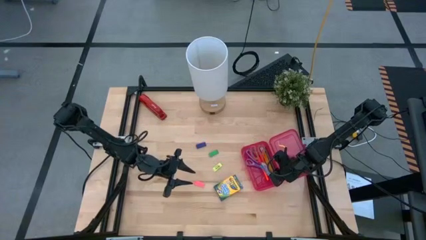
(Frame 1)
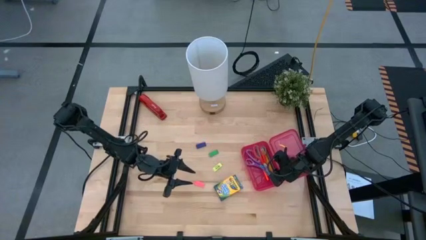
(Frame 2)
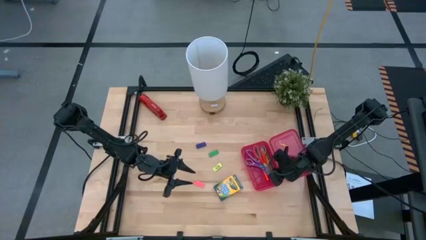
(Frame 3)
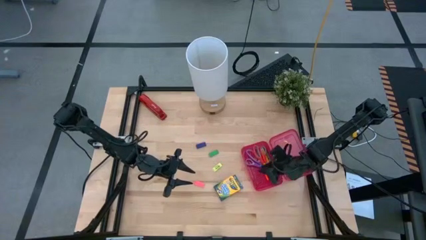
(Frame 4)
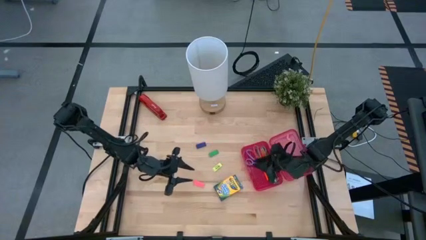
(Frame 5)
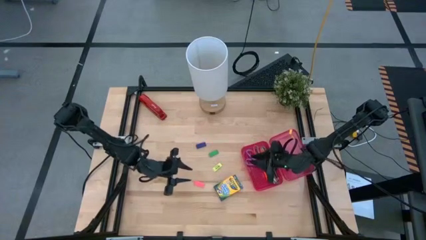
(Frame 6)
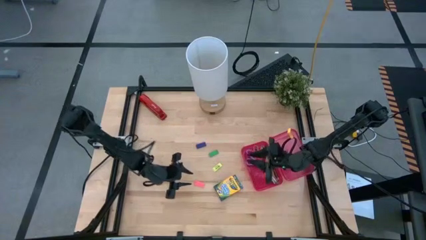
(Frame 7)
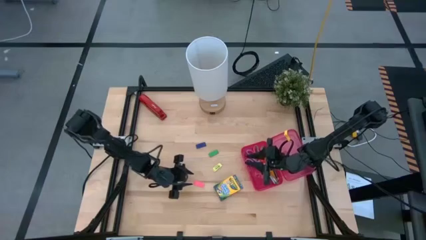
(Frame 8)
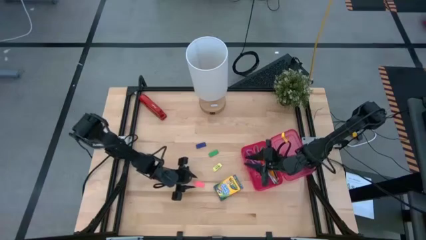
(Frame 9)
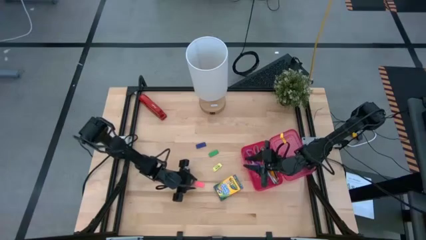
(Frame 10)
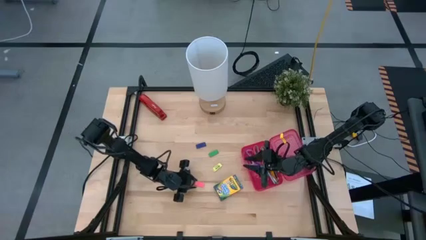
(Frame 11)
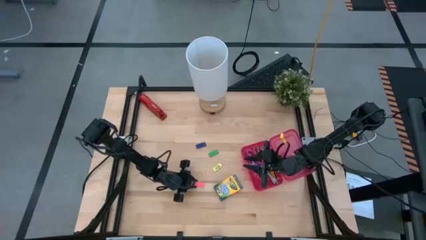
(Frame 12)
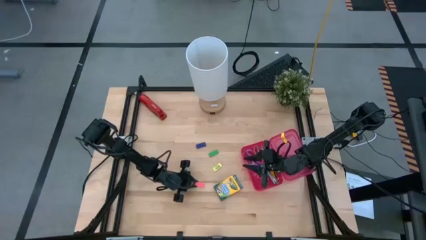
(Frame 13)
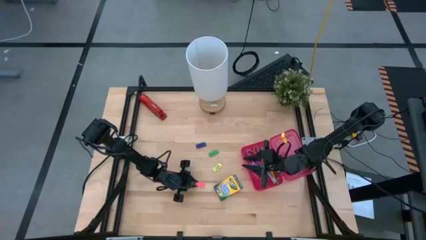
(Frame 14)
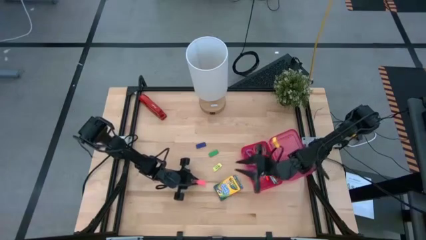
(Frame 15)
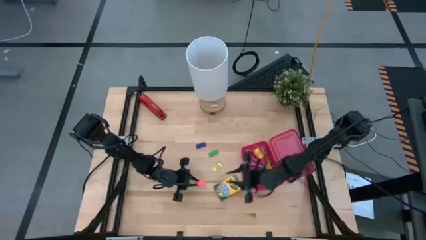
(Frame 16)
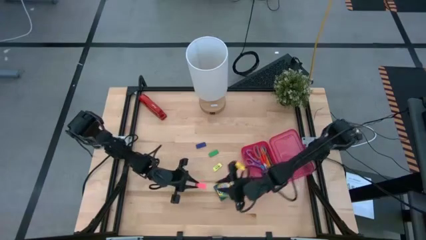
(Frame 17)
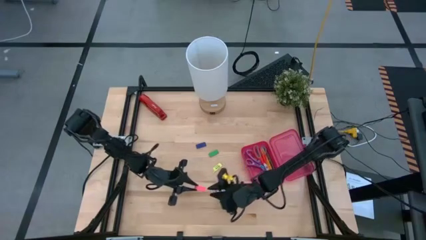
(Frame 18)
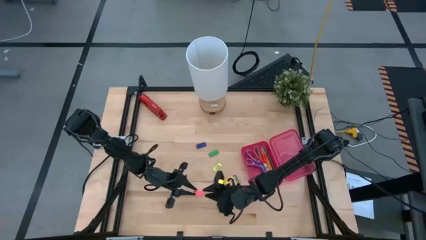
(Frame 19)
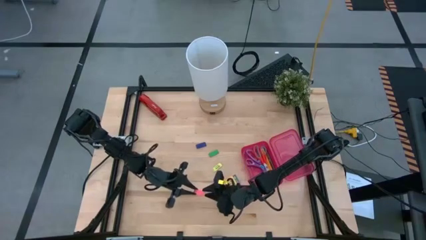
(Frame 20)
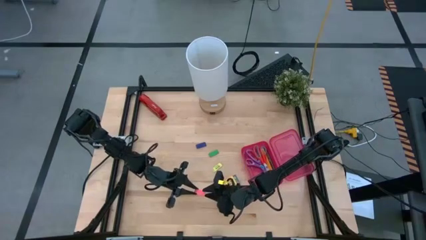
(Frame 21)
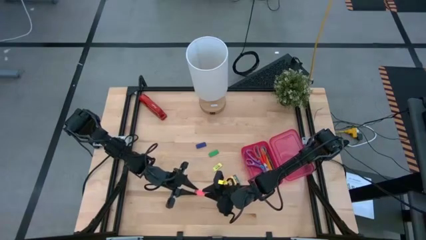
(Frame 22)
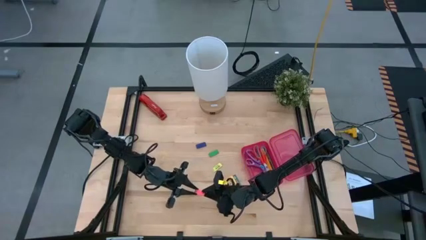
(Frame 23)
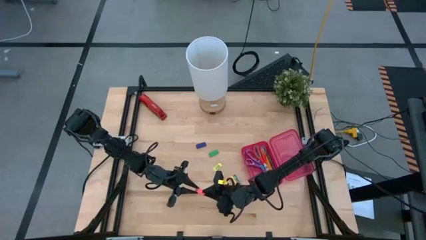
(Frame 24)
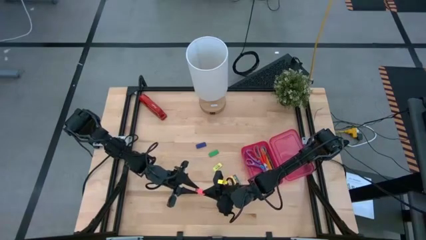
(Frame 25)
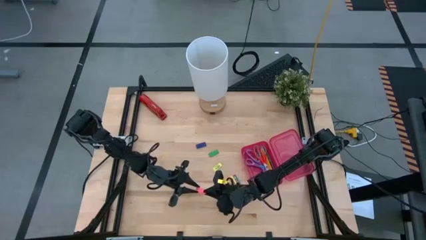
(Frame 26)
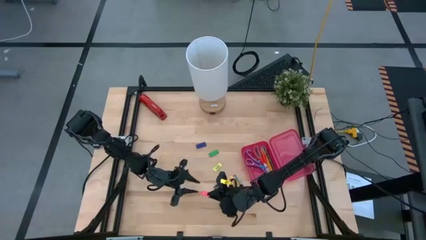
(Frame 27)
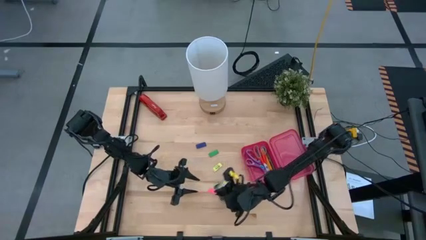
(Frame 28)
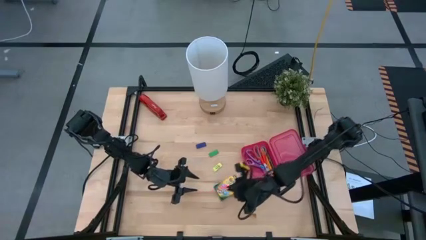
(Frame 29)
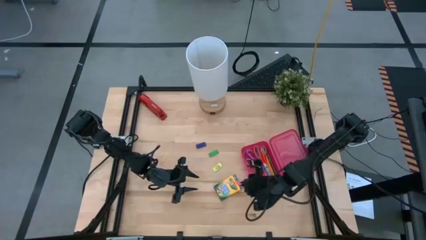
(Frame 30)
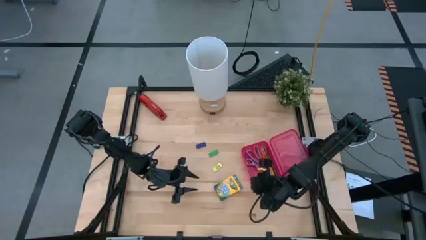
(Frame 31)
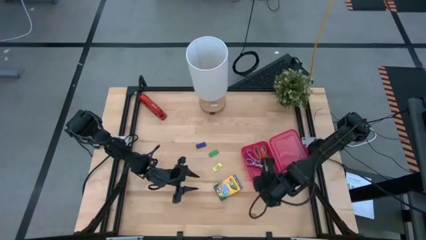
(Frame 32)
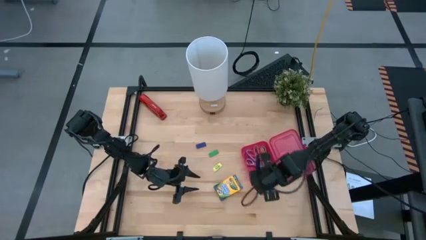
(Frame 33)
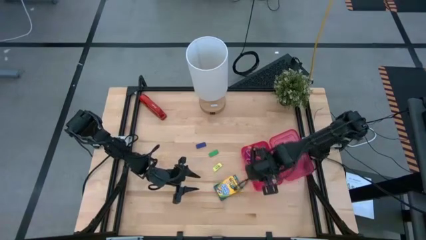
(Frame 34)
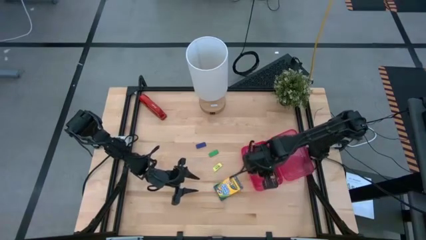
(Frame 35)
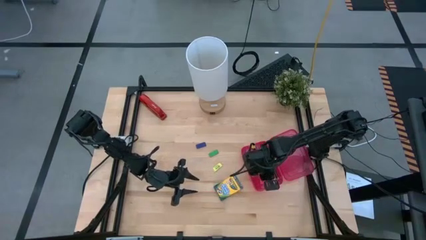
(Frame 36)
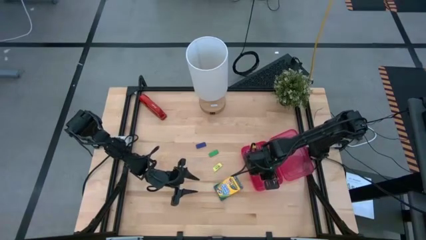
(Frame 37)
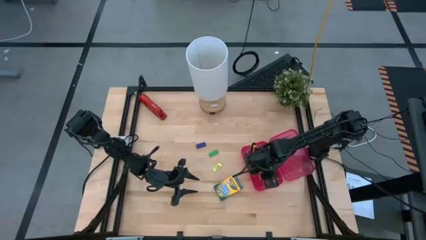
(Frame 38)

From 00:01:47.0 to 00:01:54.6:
Task: Pack school essentials
Put the pink eraser into the pink supply box

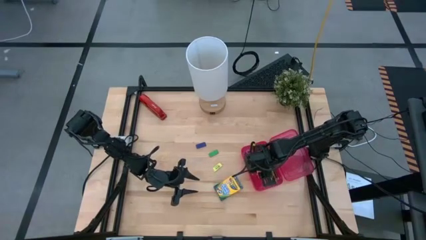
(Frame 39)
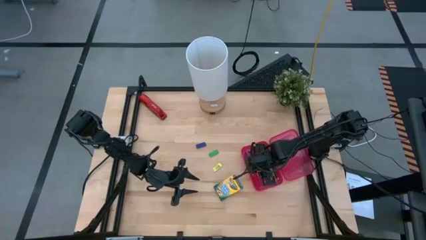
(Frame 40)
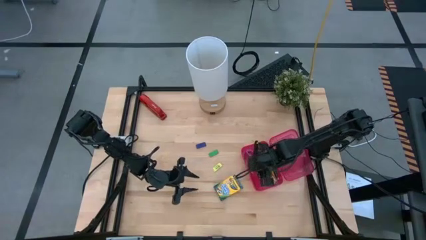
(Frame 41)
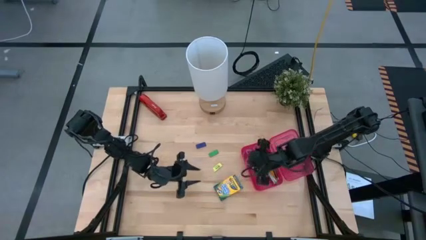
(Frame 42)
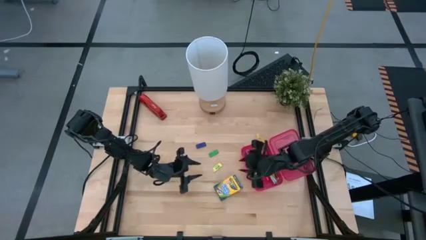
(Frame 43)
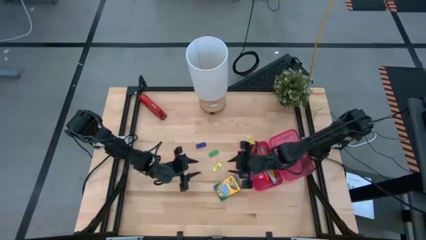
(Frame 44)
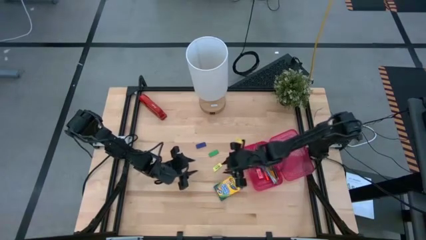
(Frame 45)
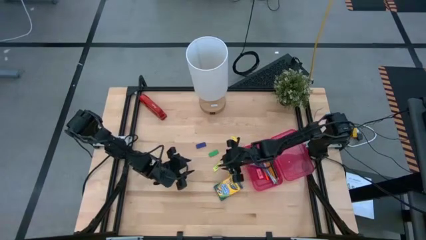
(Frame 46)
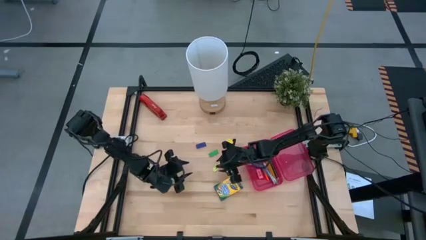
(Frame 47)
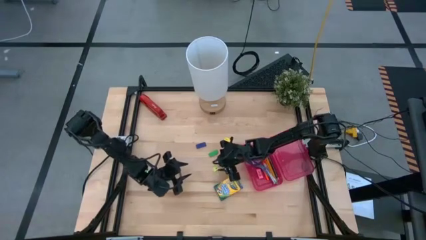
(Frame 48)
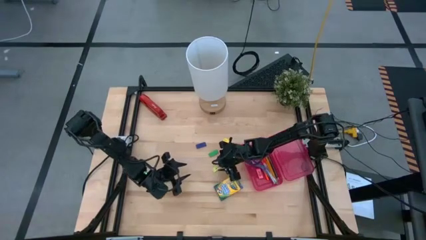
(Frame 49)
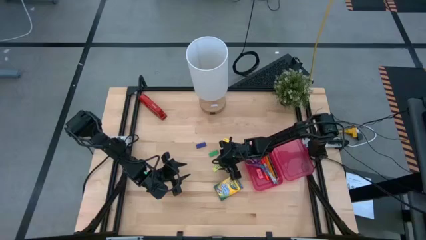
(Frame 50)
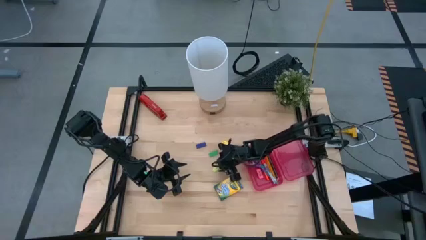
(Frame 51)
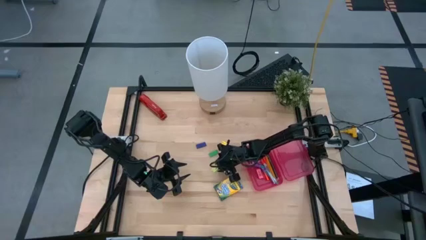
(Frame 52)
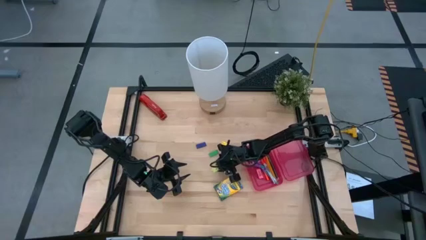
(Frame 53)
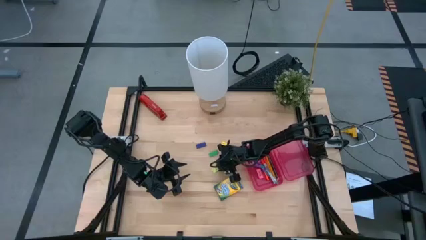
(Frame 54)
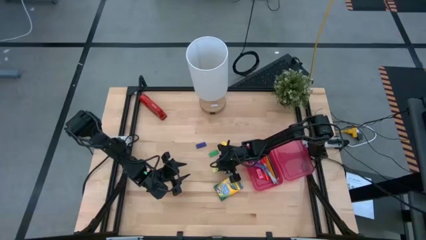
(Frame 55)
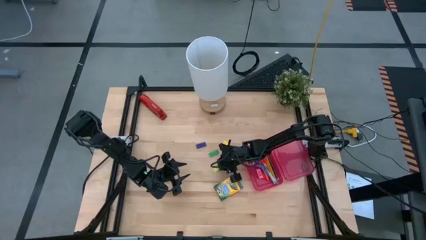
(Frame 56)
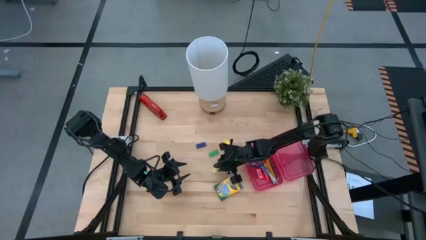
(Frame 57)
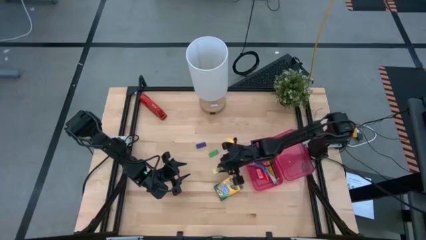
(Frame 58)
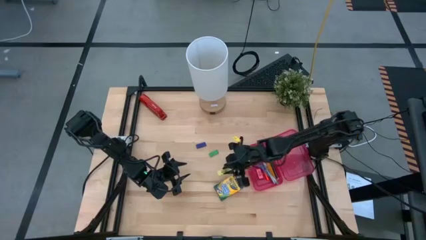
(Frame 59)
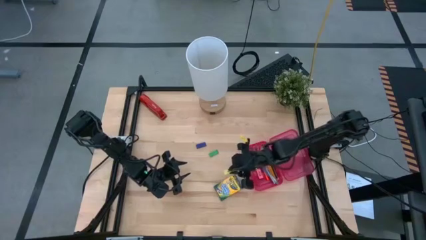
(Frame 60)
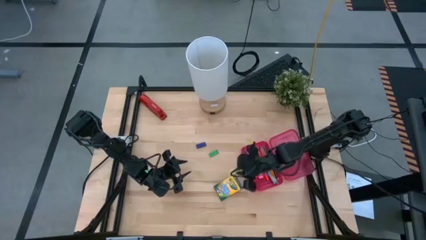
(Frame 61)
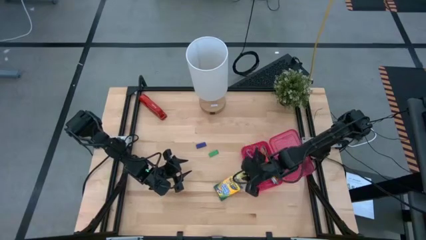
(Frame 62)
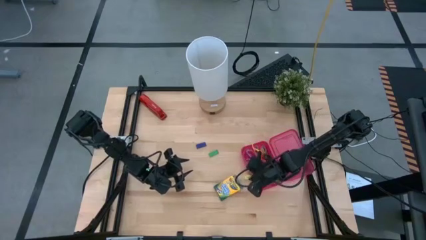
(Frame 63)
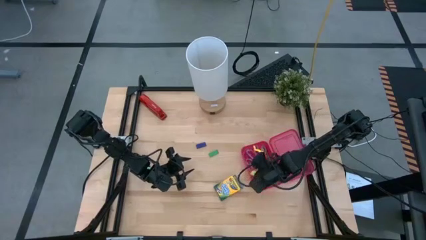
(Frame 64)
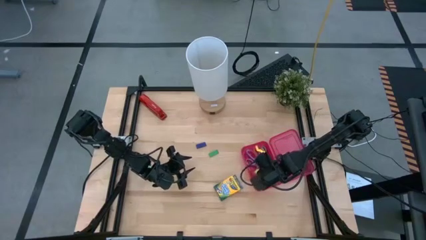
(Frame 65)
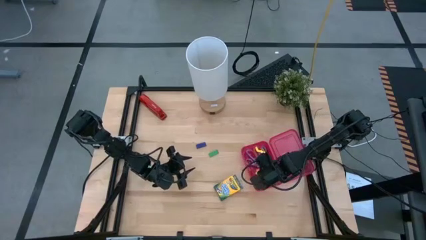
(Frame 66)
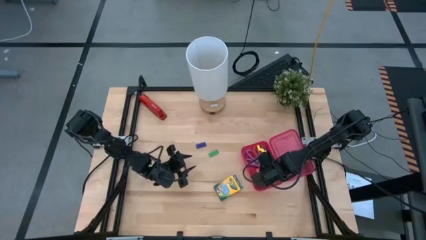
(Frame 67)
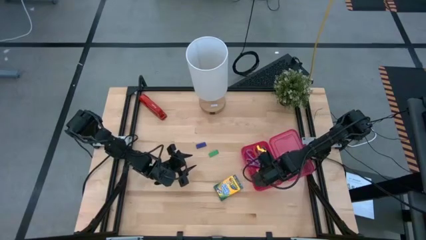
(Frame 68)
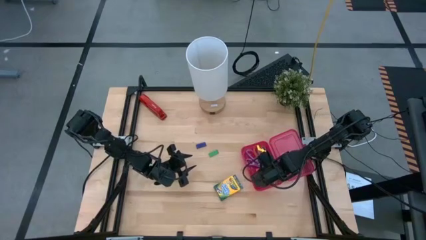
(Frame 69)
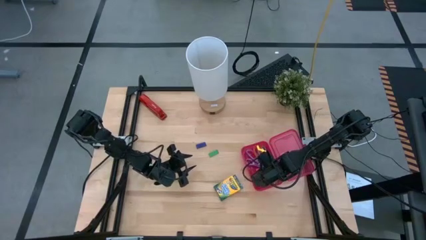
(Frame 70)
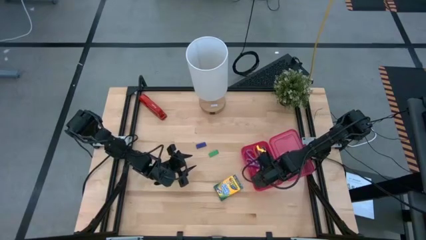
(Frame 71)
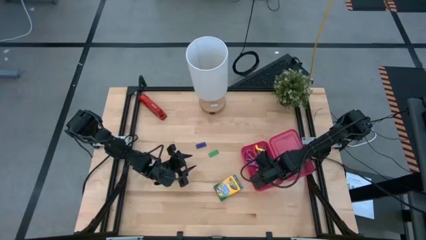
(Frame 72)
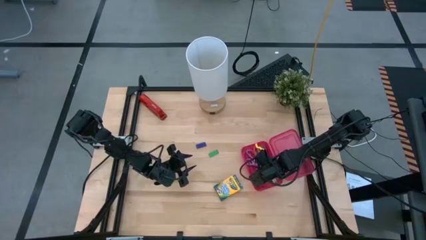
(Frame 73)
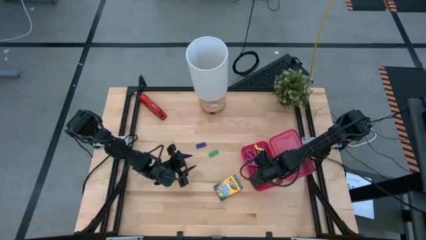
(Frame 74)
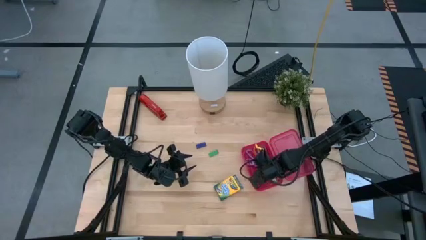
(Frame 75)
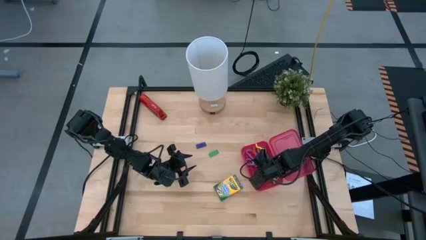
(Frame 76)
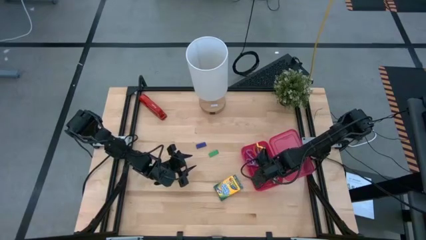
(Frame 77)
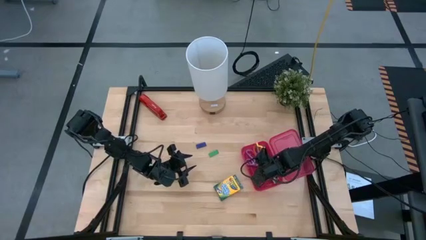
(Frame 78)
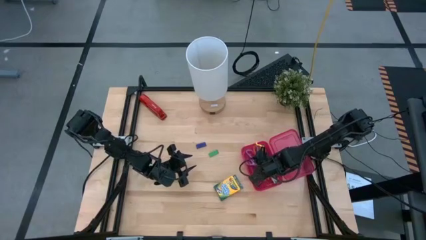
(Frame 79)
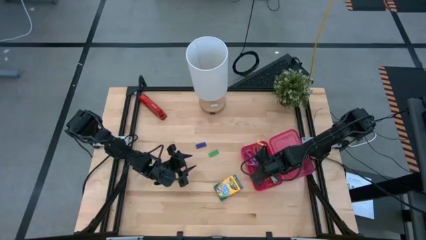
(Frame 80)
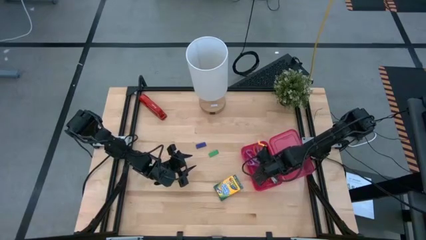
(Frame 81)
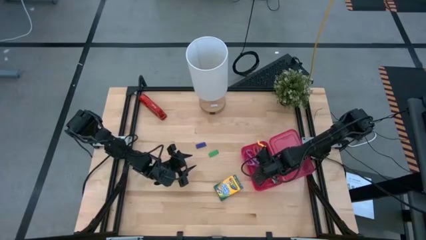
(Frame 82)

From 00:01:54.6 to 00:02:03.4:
Put the light green eraser into the pink supply box
